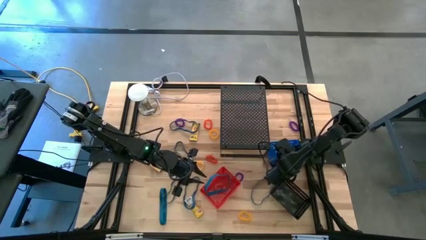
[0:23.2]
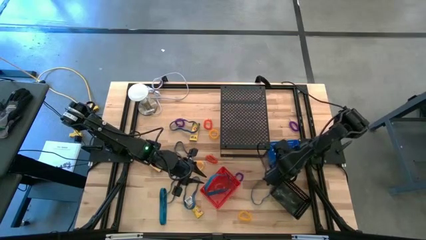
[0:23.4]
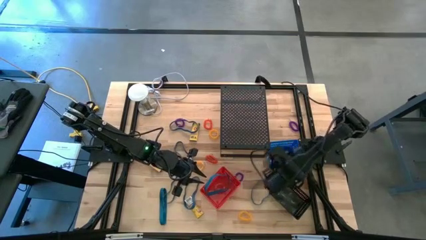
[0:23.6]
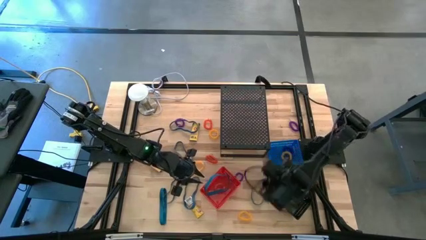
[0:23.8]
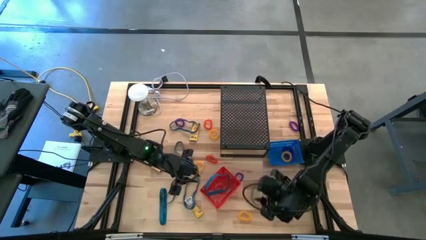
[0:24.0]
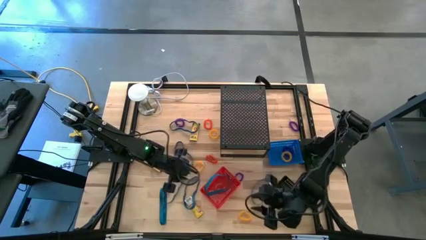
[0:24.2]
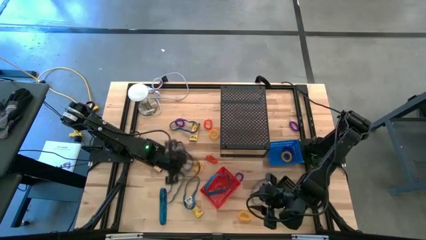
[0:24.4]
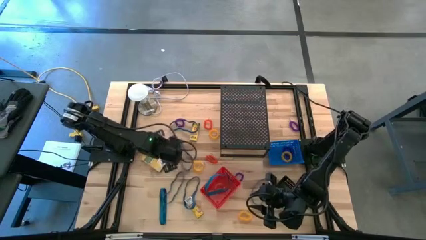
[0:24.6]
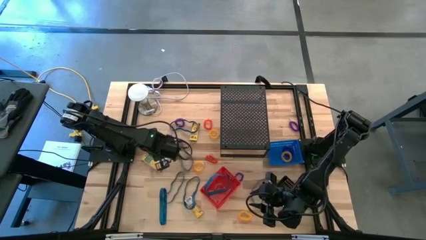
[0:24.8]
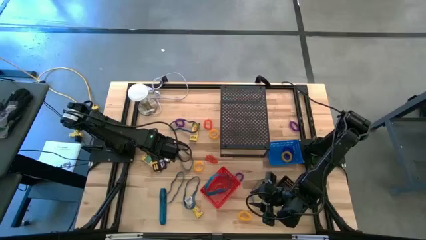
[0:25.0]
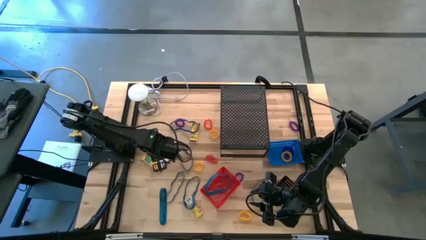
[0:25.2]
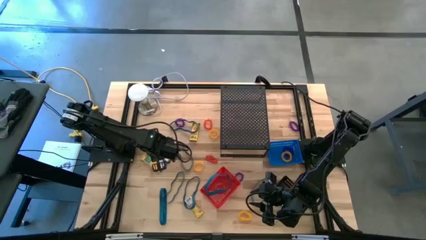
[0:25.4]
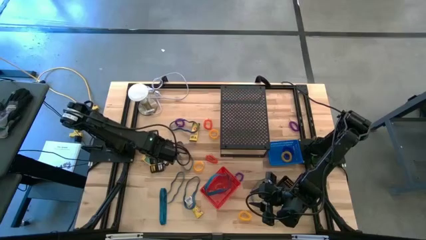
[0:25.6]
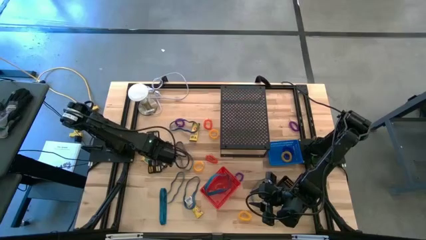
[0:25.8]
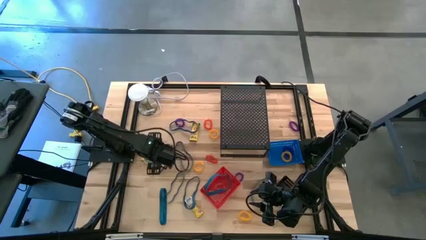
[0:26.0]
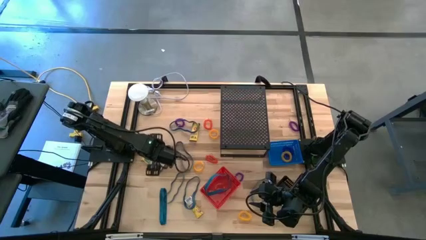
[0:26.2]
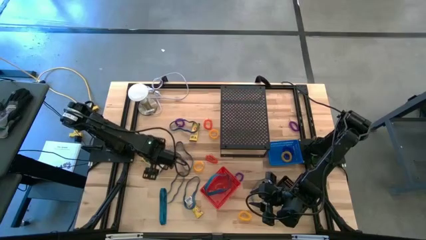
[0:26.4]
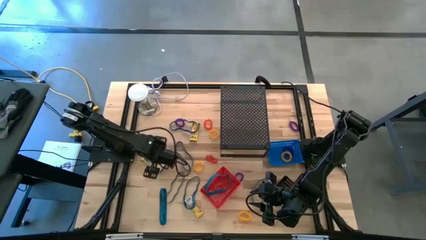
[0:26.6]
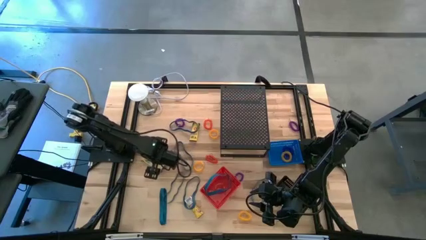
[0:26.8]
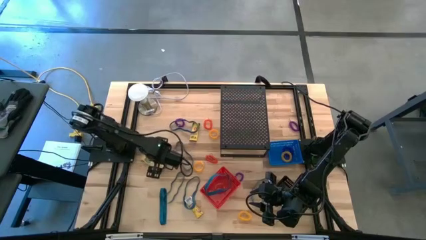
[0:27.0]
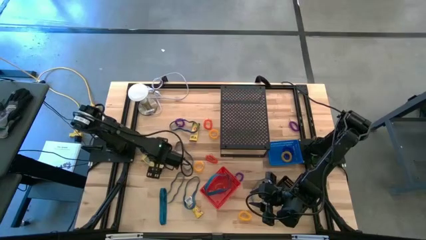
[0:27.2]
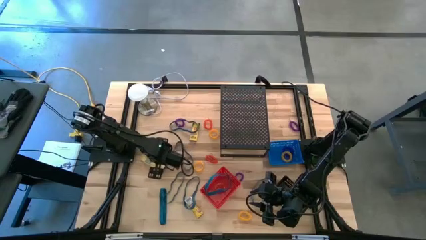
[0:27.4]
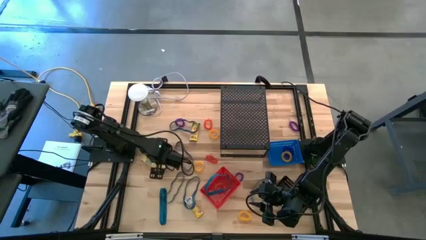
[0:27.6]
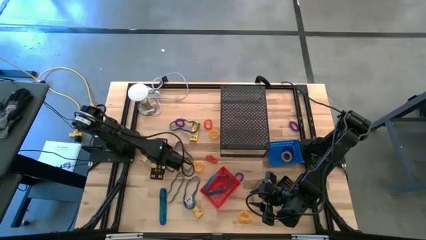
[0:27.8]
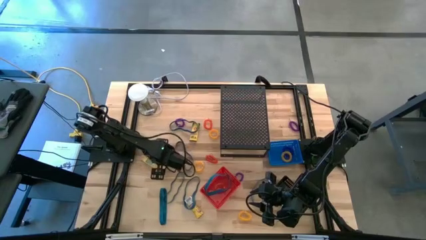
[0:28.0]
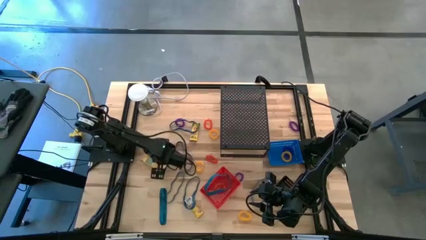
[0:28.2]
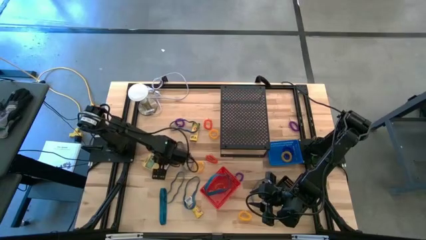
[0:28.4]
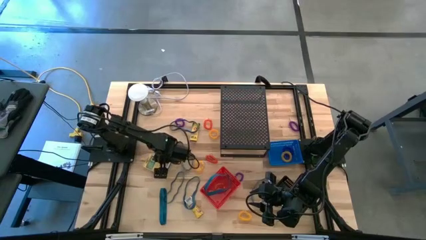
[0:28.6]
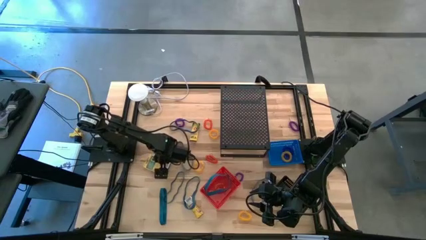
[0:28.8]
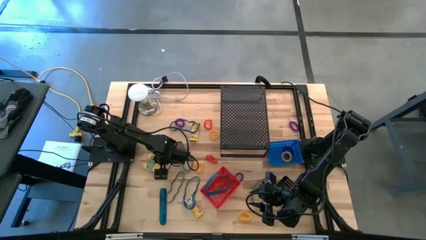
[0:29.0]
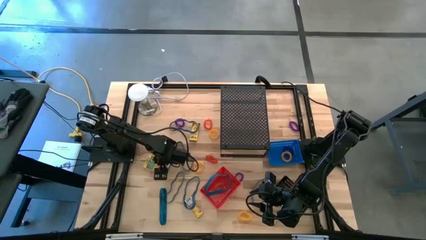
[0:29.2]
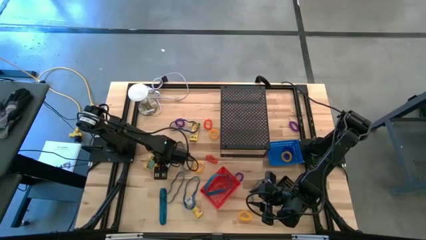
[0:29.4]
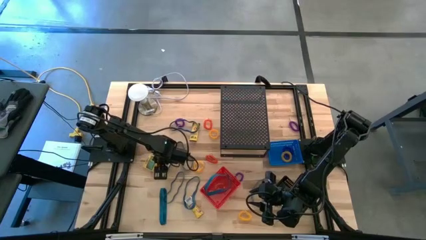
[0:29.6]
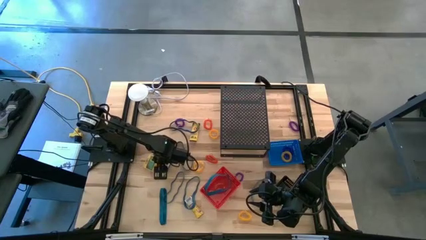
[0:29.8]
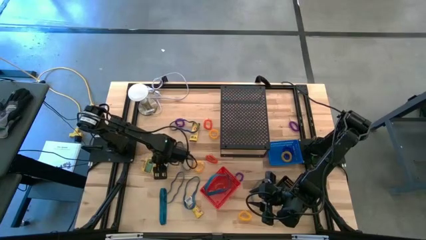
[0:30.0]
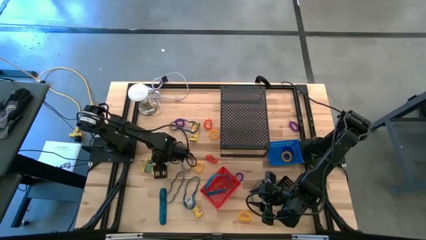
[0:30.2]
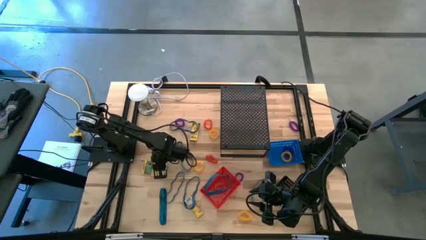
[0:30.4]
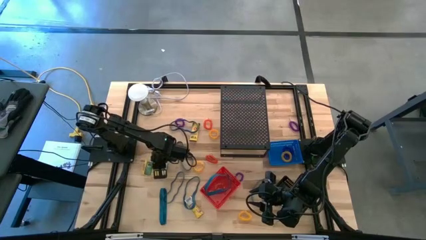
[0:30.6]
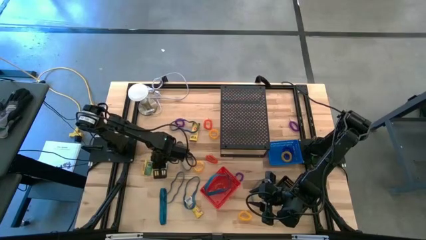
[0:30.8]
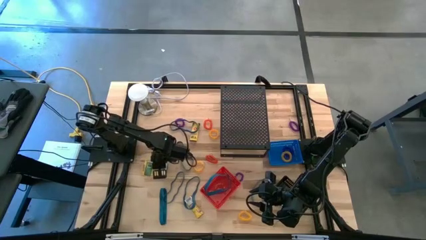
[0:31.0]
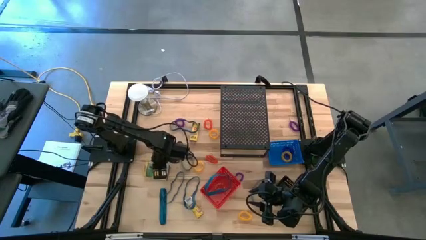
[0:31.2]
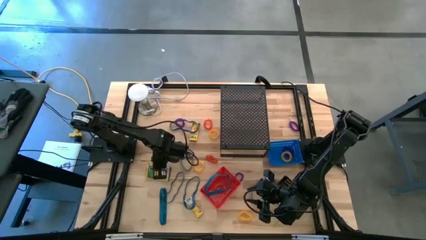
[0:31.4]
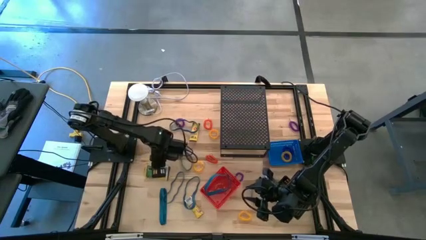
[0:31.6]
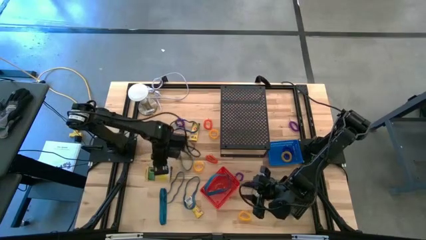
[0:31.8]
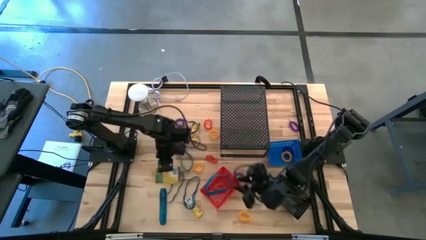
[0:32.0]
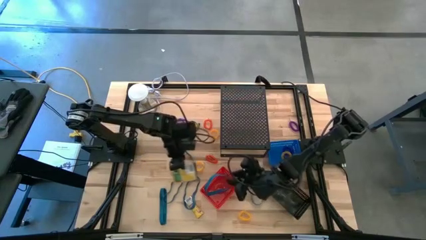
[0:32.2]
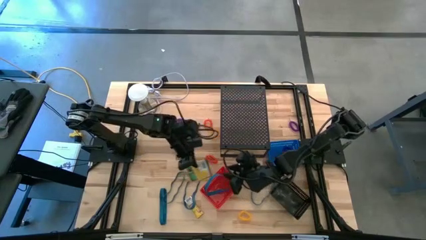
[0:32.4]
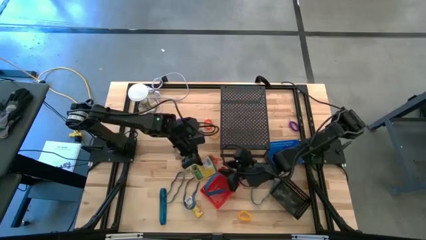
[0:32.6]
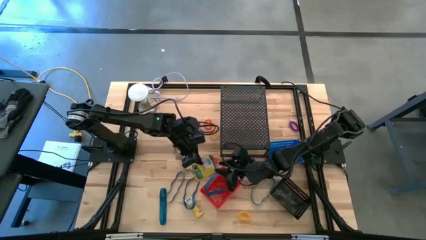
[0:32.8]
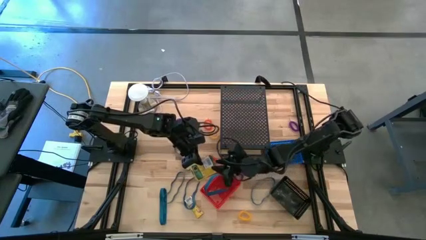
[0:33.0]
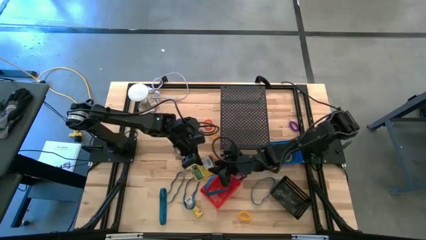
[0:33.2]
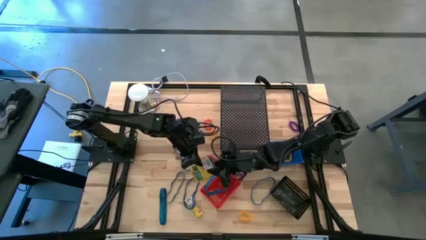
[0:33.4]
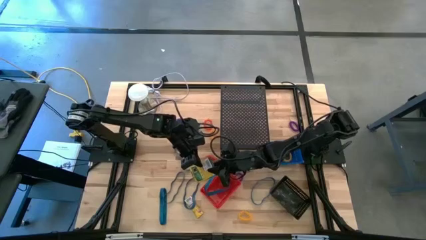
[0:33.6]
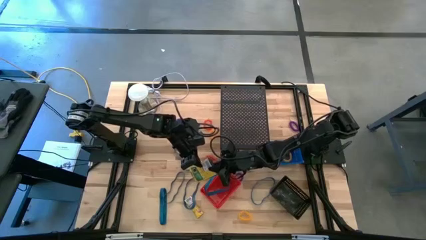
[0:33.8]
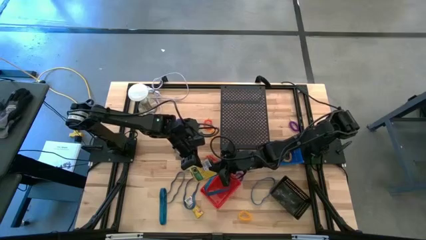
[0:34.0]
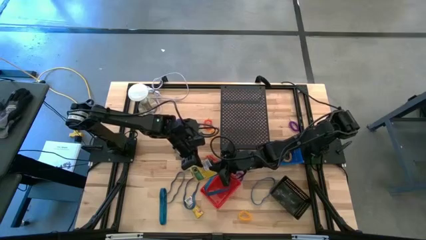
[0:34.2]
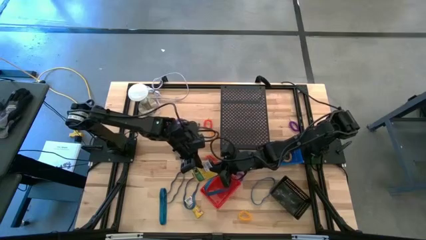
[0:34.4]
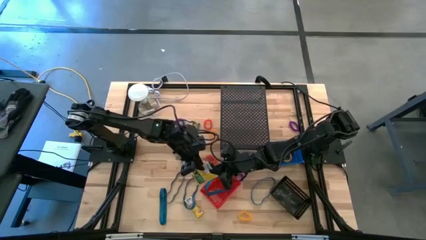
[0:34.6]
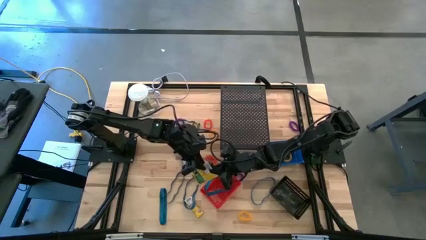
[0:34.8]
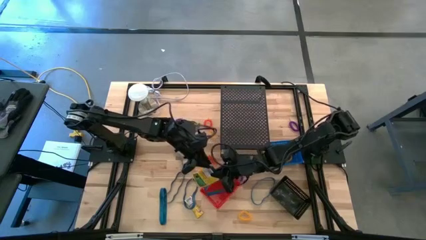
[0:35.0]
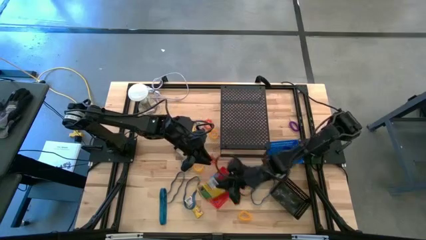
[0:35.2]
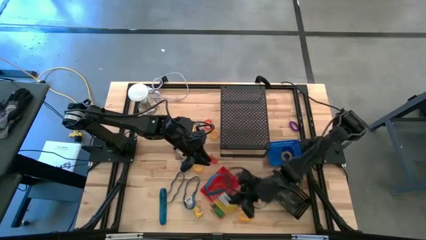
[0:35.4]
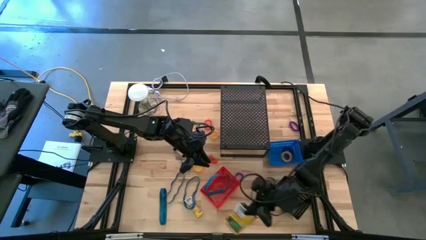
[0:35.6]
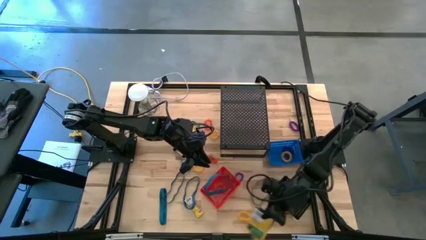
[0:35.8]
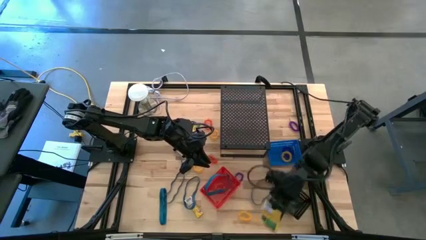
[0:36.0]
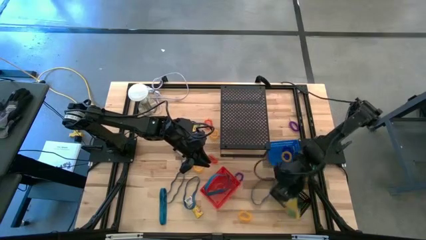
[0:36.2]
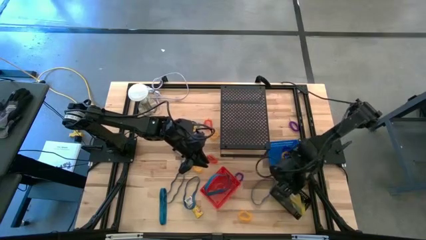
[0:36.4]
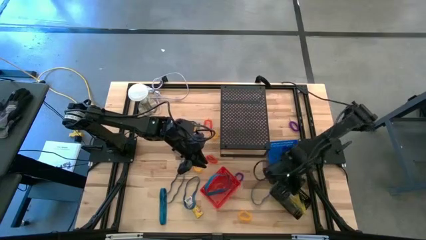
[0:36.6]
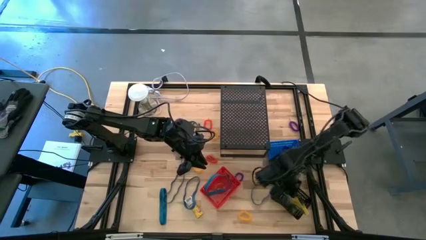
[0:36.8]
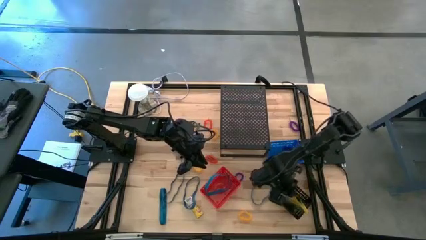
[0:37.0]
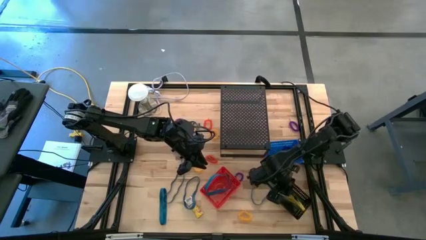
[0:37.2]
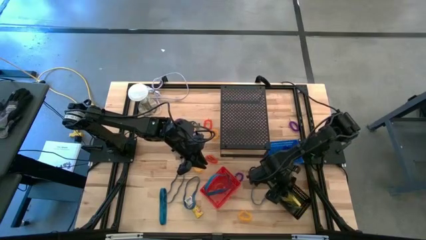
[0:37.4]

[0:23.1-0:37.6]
Task: Pick & Place Office Desk Supplies
Put the big crayon box into the black basket
